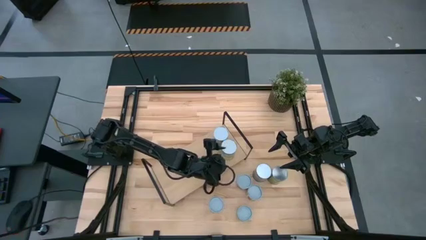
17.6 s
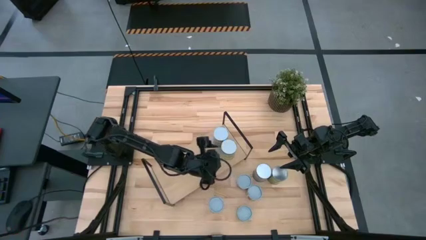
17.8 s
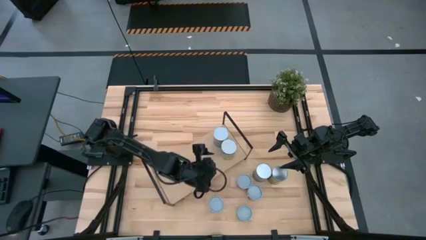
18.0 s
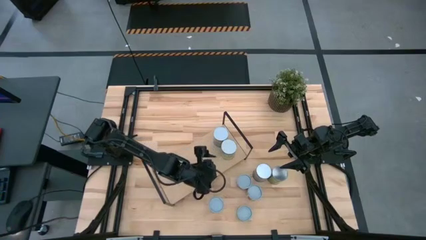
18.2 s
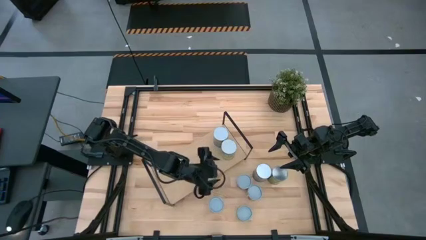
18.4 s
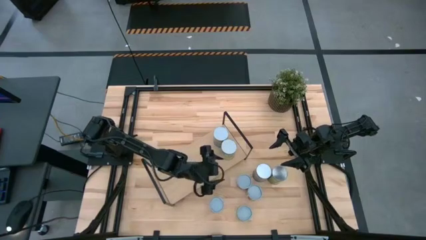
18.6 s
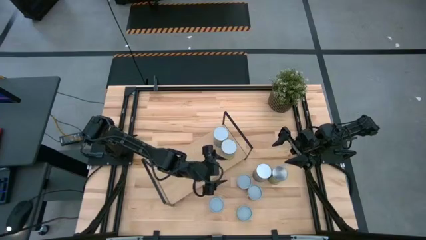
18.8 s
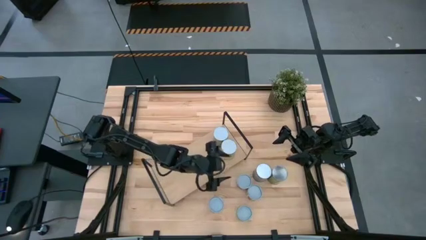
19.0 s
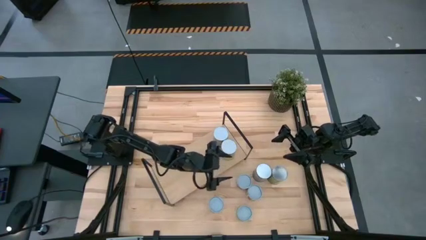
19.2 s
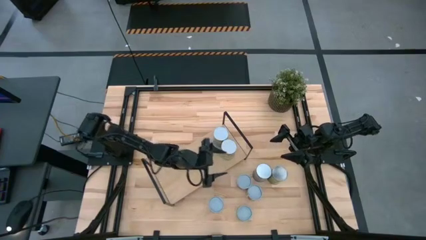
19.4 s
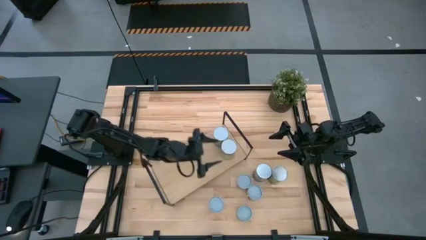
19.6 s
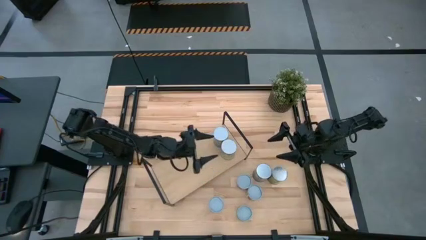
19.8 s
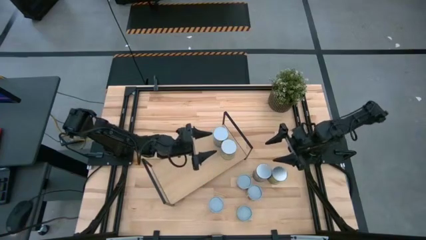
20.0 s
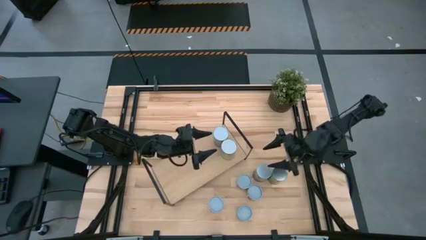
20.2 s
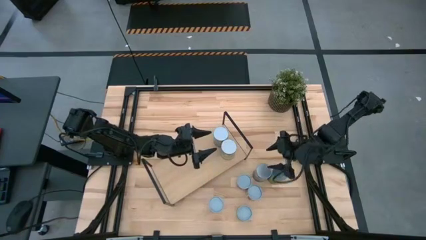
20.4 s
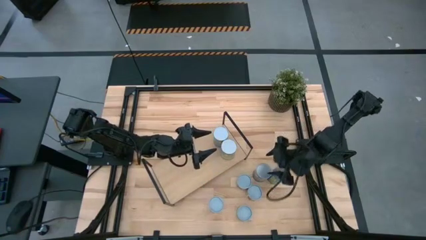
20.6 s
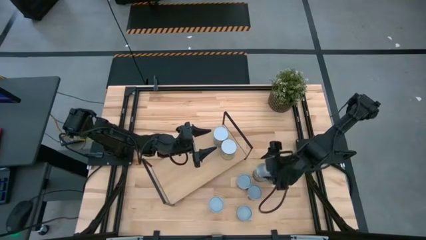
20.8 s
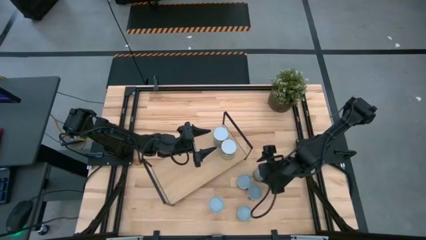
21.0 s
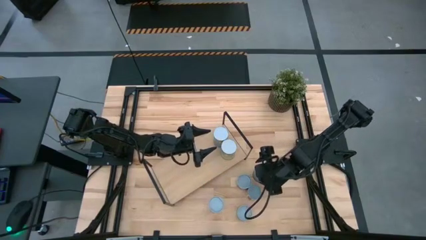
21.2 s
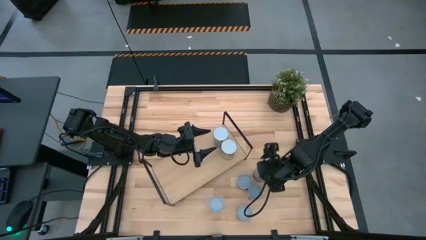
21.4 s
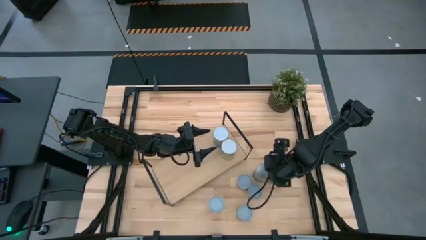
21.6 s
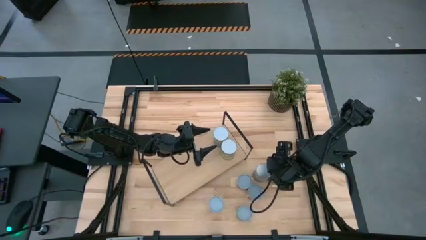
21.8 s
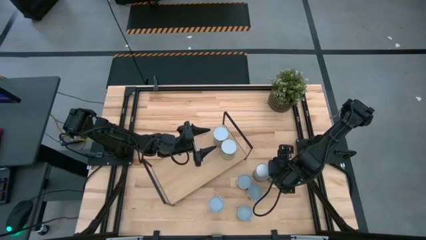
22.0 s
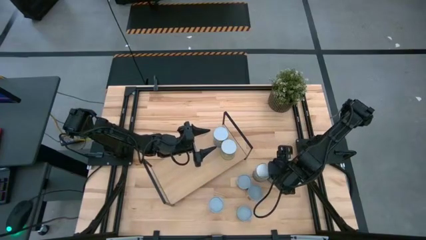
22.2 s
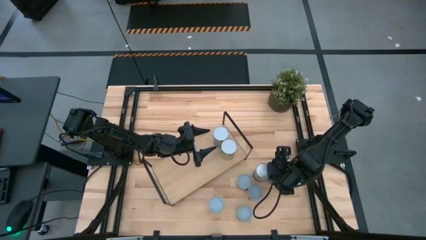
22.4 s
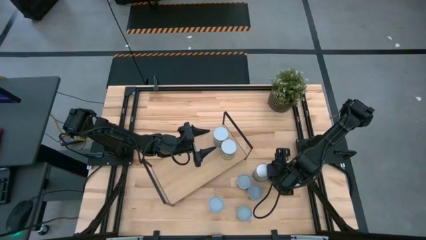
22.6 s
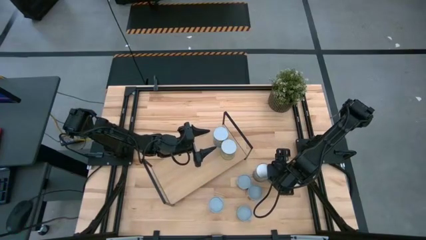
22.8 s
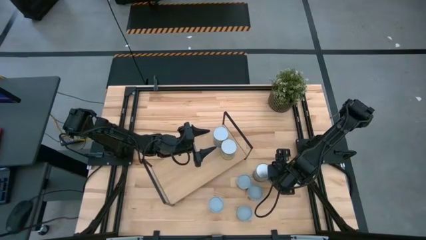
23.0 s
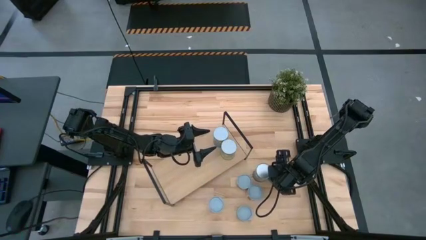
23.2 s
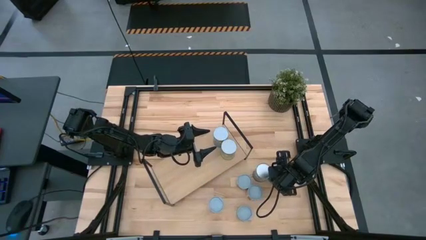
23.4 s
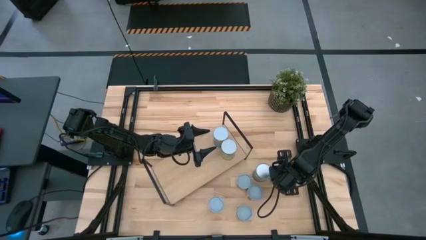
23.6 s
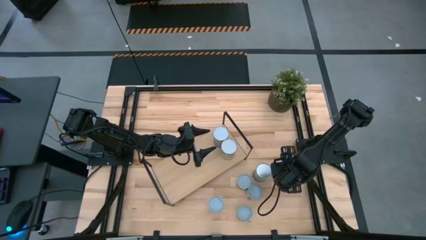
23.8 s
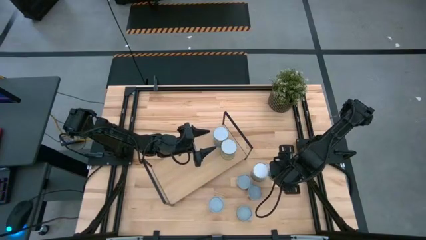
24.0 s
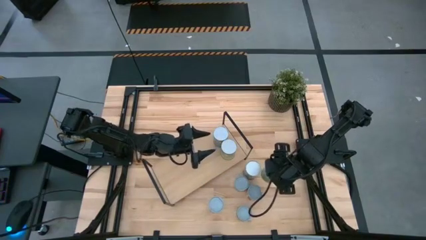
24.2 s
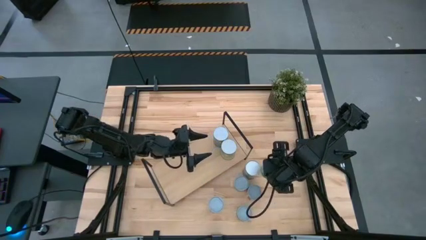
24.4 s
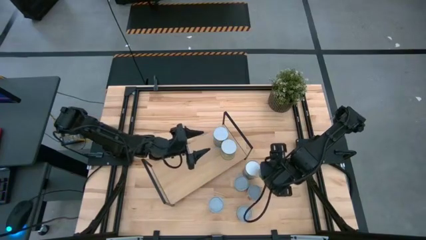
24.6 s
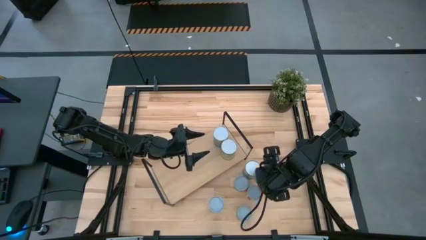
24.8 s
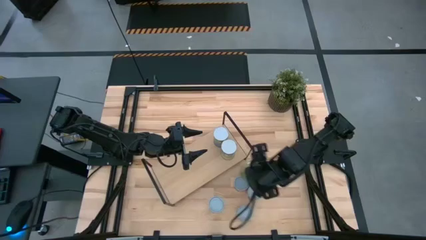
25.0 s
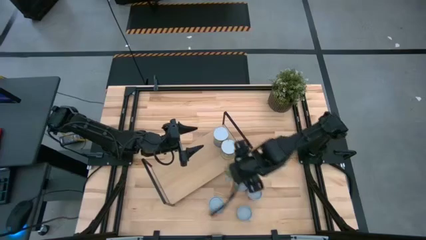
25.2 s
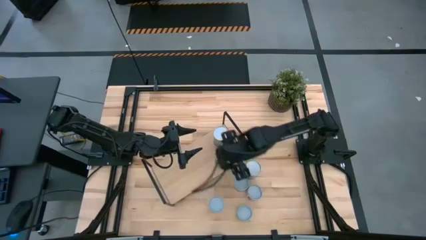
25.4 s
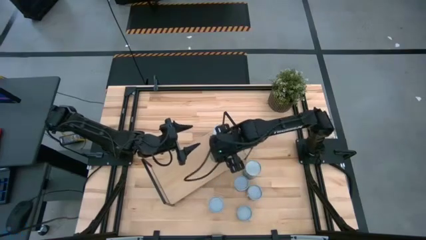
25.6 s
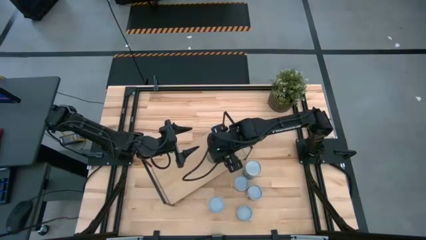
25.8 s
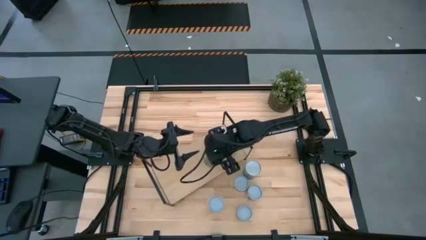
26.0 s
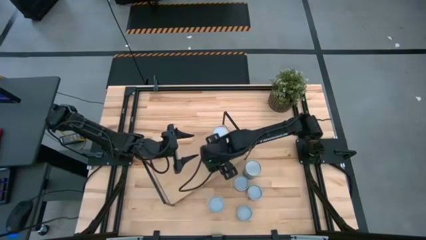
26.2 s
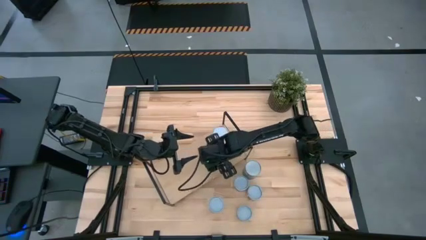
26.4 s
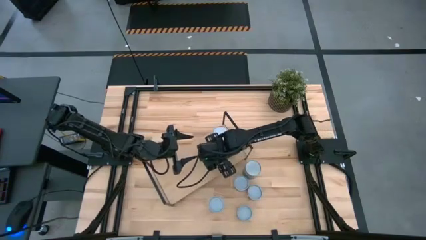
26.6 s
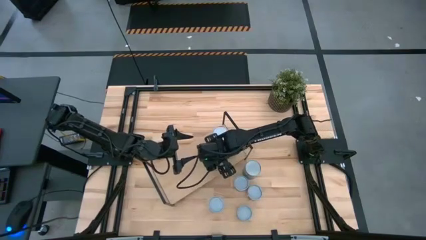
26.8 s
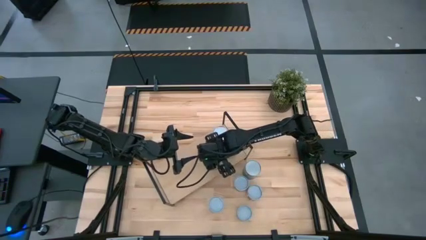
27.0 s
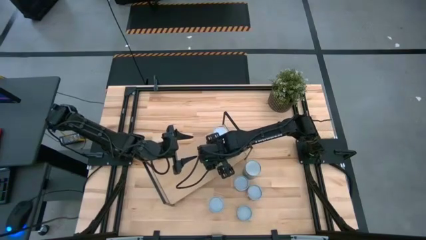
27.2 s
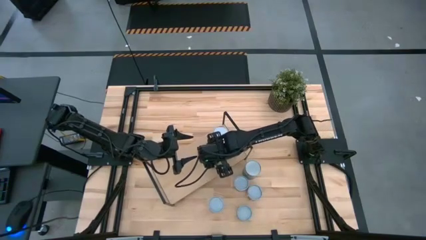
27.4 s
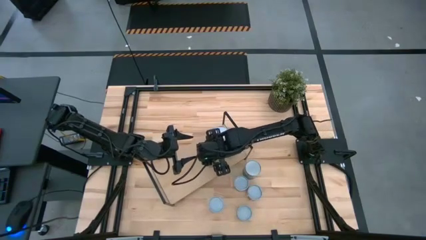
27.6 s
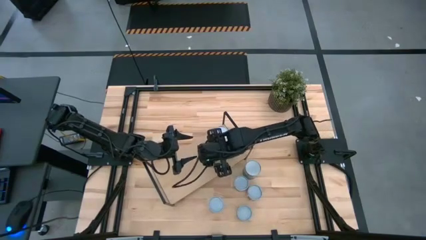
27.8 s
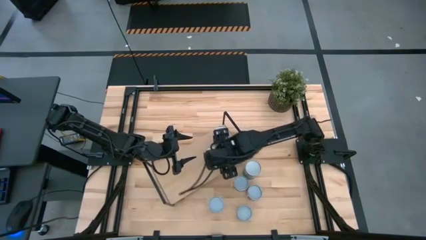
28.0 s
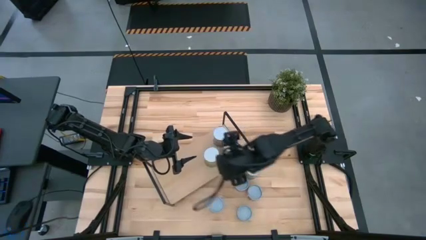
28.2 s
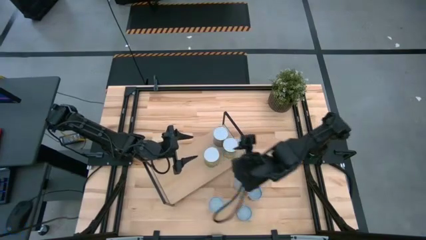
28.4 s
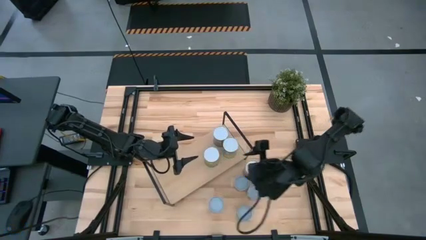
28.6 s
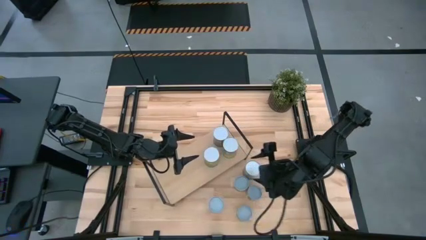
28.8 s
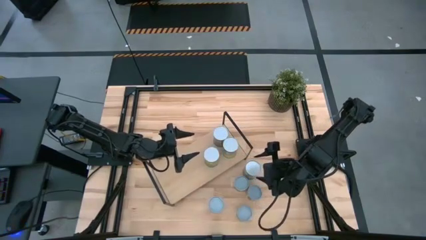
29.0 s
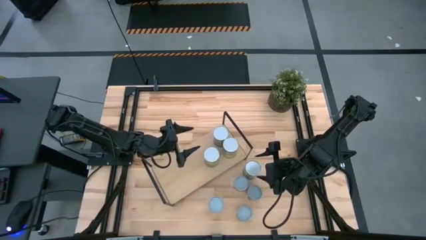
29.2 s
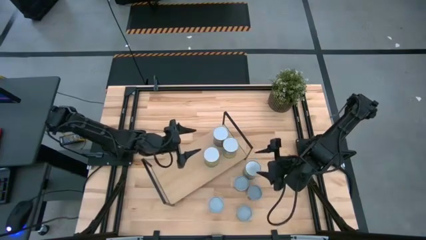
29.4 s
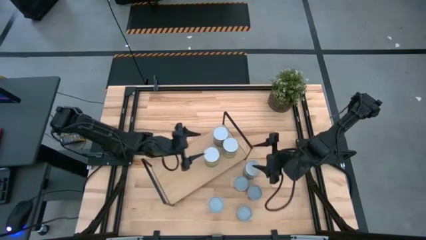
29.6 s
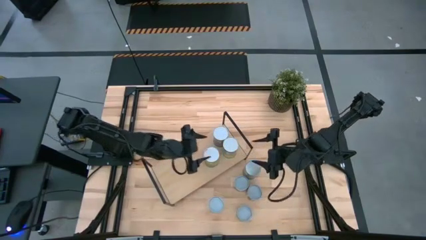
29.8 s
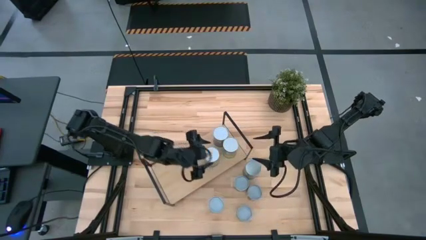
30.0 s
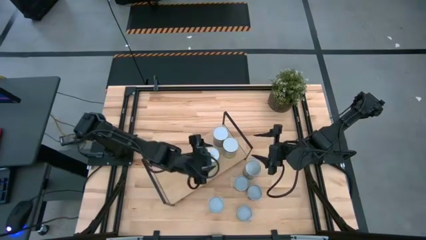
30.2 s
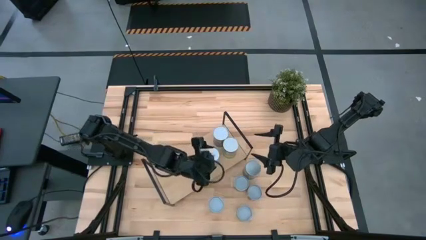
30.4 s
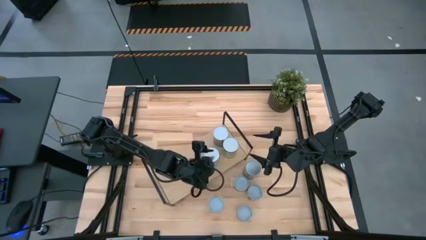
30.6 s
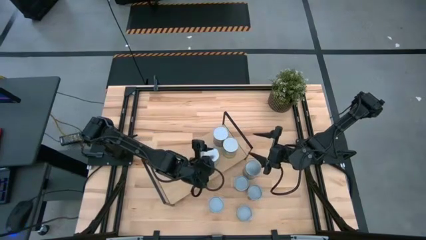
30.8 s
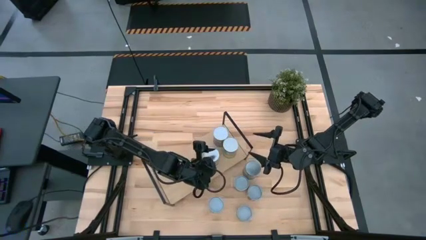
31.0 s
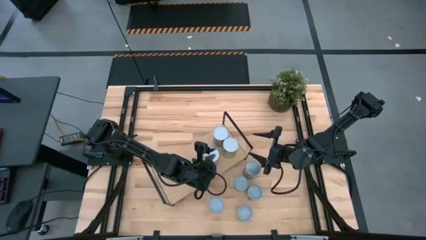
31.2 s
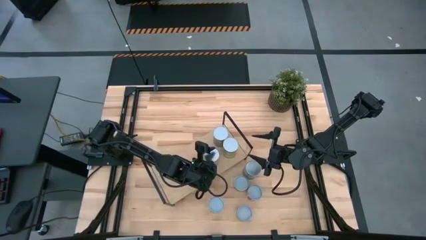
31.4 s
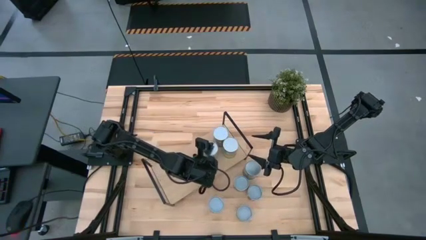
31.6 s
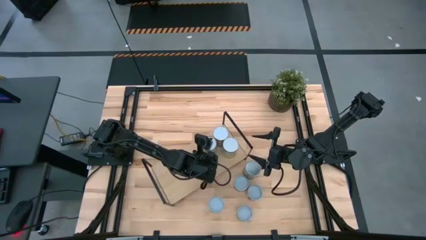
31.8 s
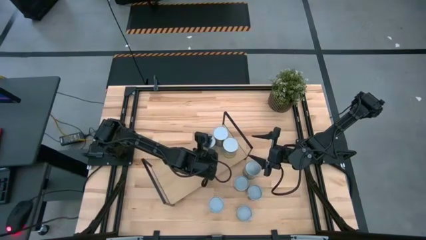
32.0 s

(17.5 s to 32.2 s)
Task: Pick and place cans onto a shelf
Put the large canned oranges on the shelf
